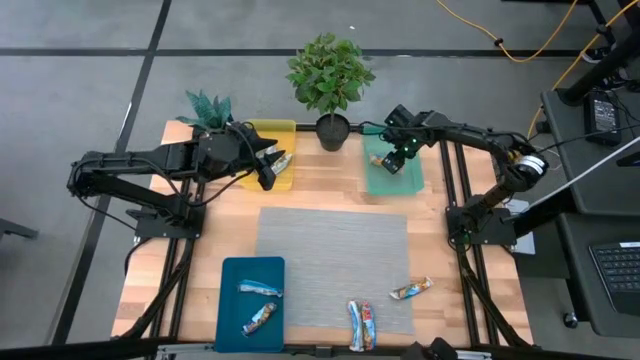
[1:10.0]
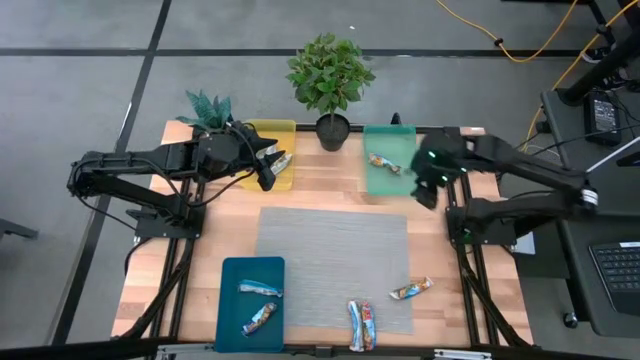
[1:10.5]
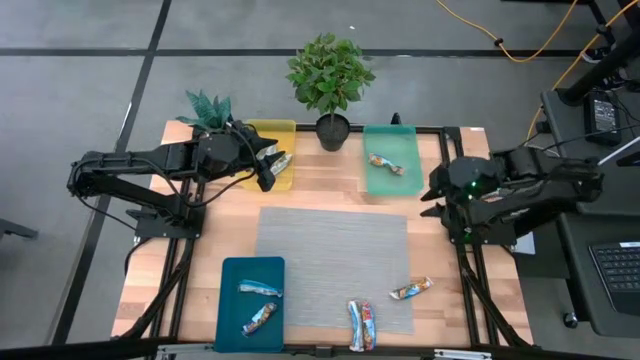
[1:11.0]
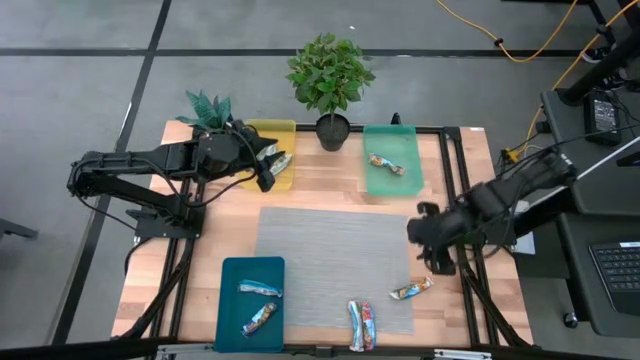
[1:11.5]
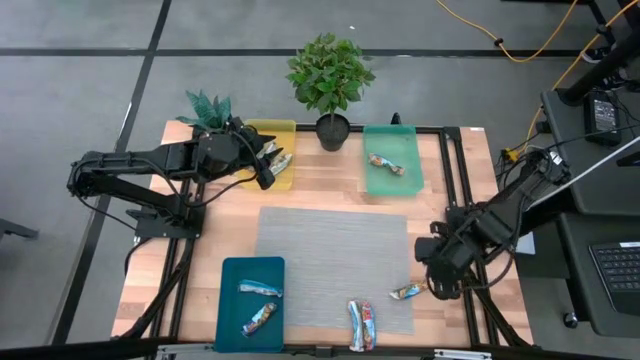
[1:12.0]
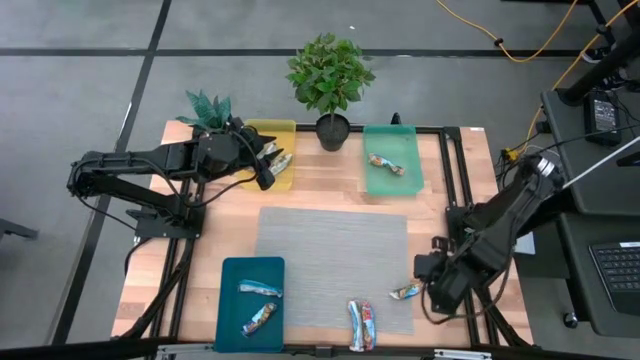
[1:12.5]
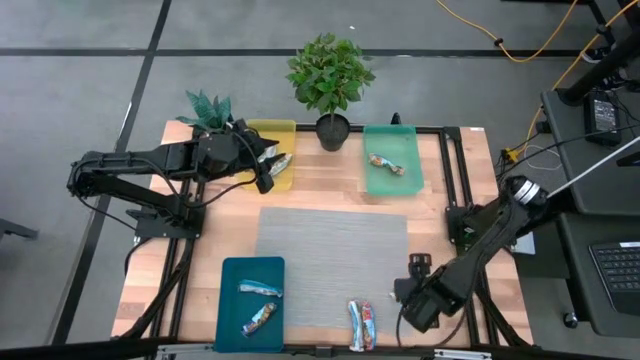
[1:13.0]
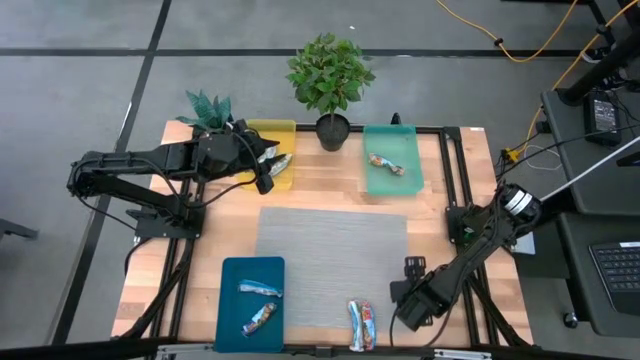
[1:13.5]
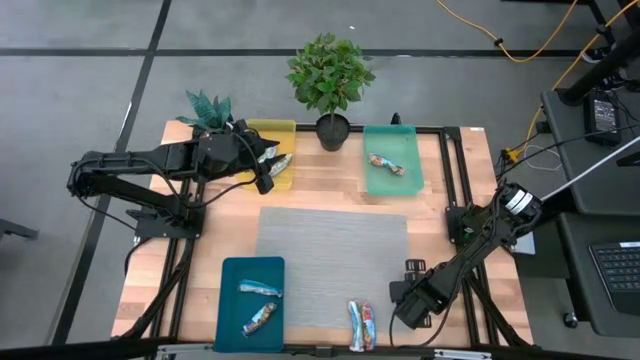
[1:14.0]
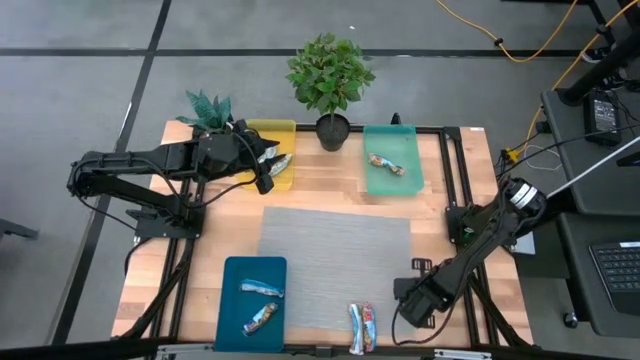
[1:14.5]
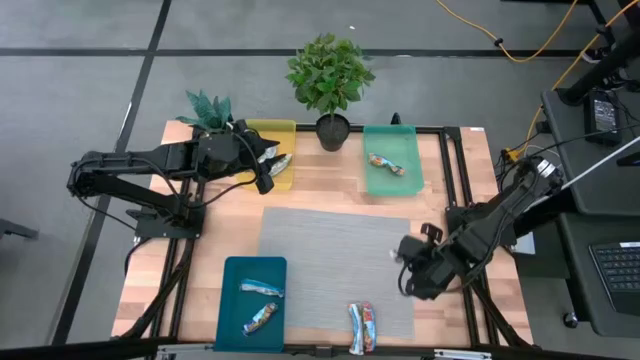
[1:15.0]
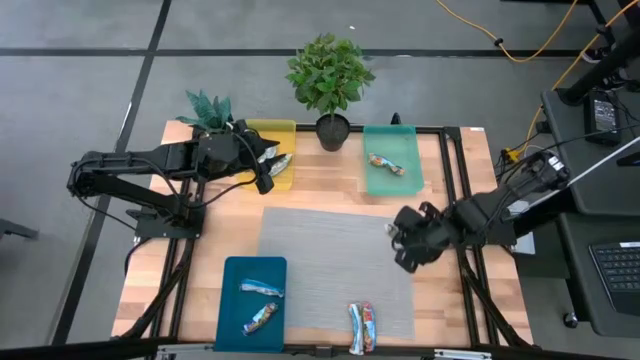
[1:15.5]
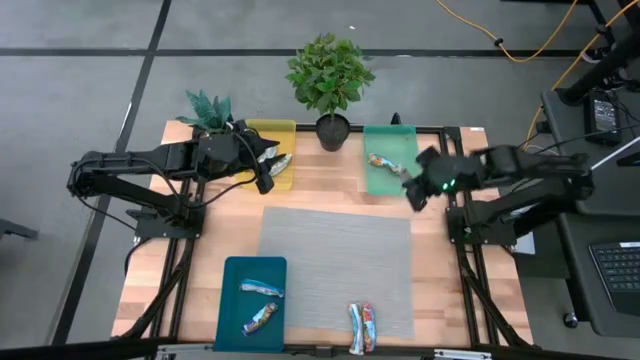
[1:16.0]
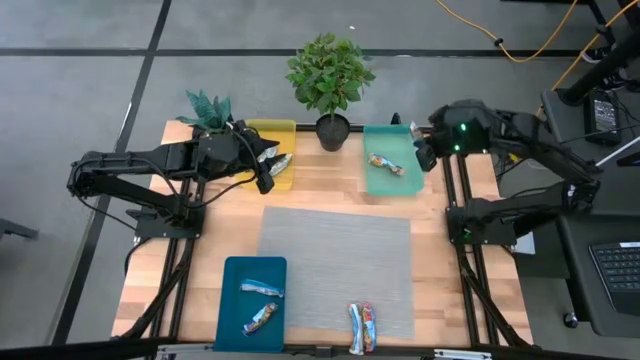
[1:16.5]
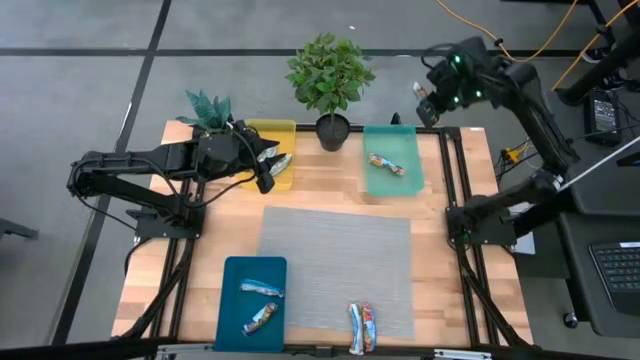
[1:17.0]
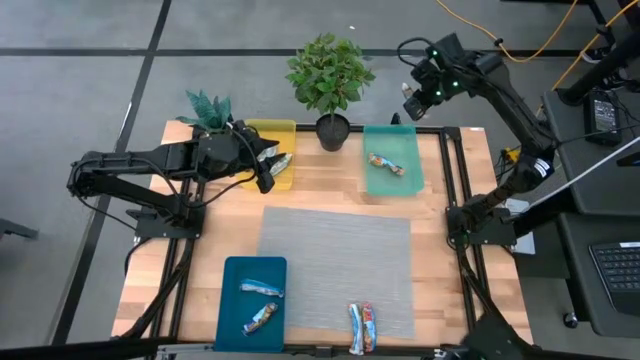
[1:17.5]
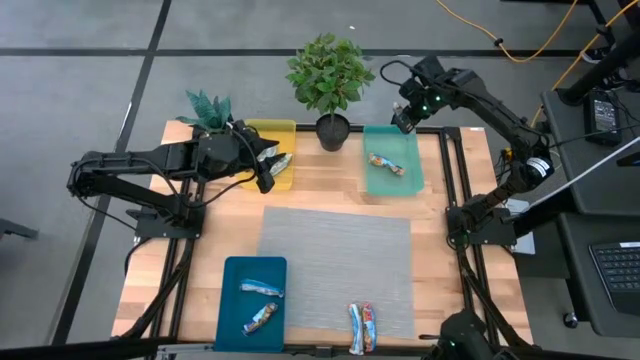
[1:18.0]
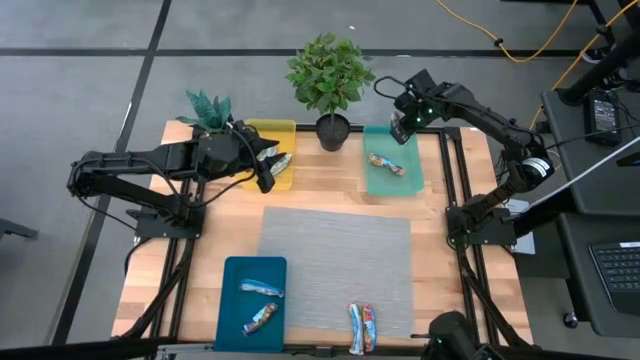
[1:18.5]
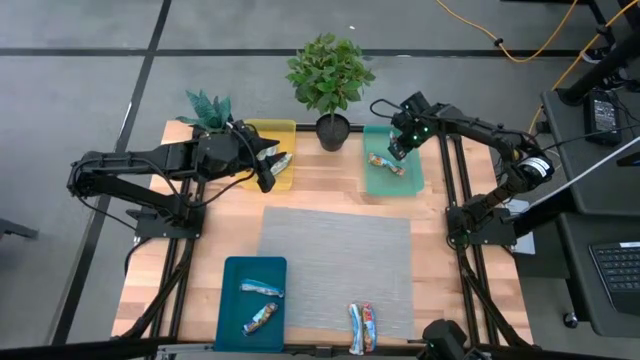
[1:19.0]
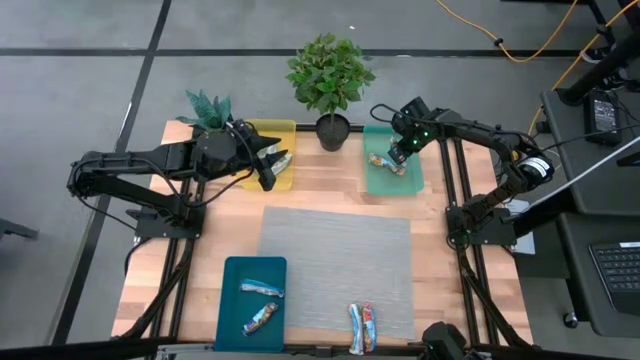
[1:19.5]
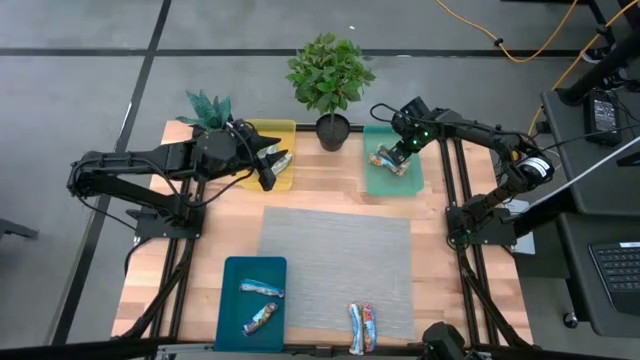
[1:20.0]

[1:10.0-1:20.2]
Task: Pick and place Granola Bars by type
Put the yellow granola bar into the blue transparent bin

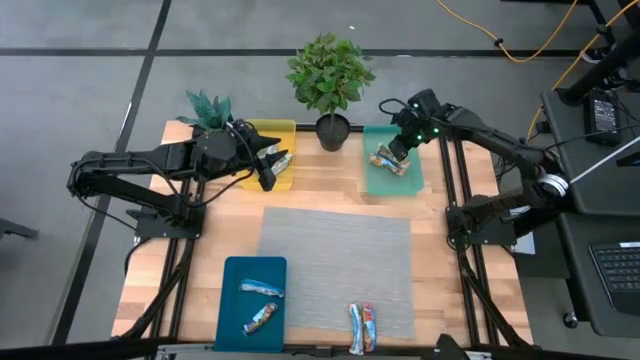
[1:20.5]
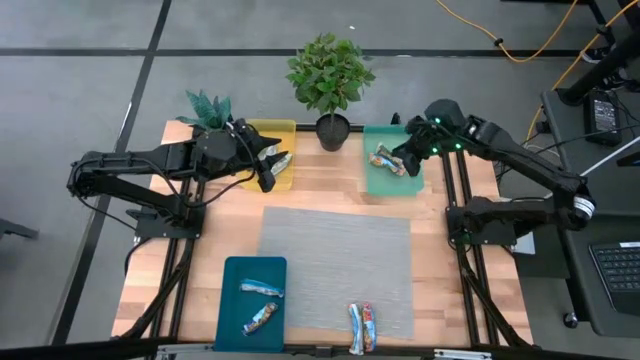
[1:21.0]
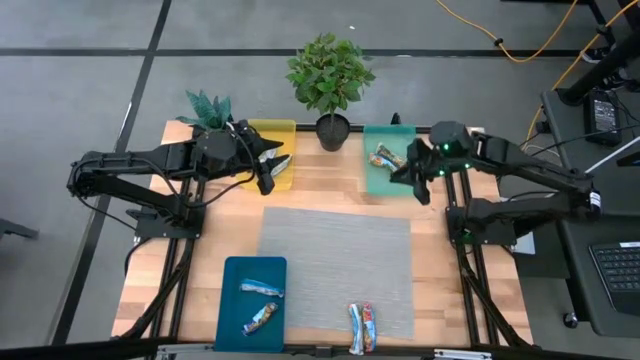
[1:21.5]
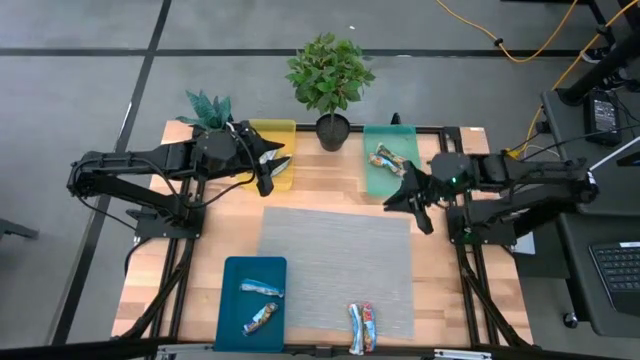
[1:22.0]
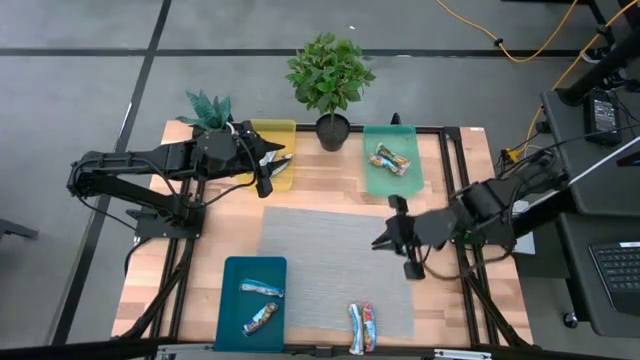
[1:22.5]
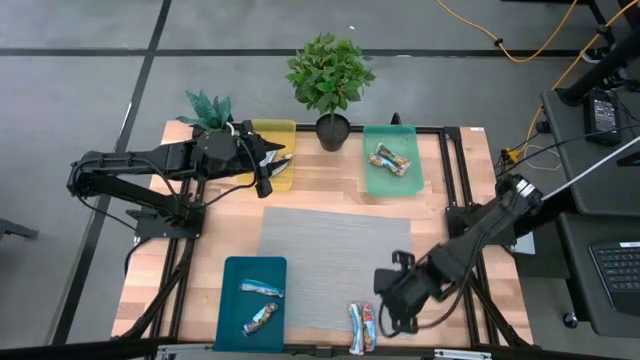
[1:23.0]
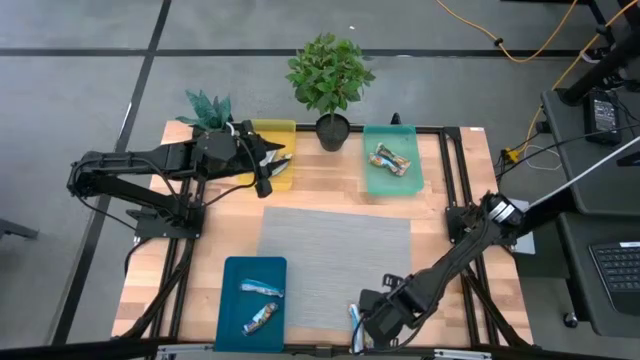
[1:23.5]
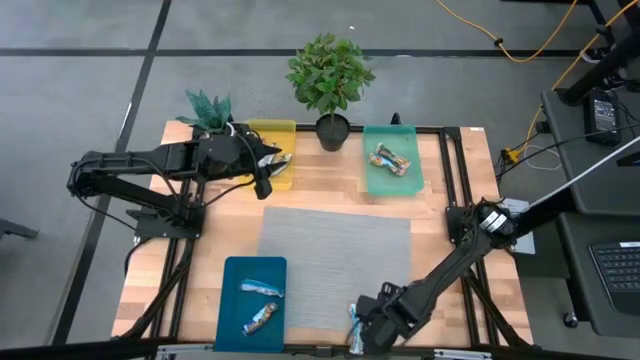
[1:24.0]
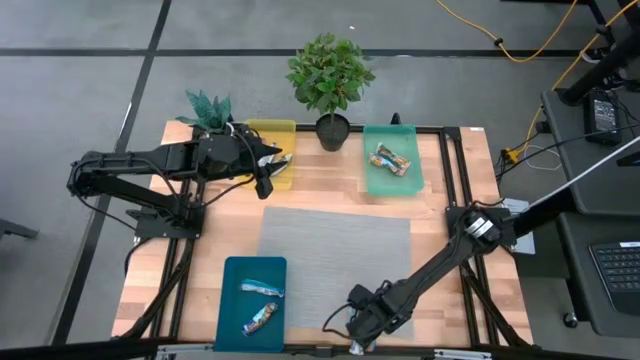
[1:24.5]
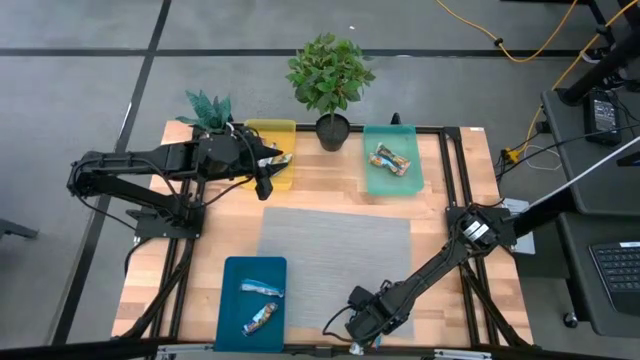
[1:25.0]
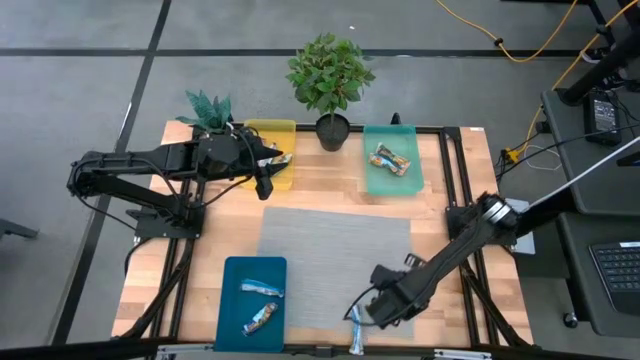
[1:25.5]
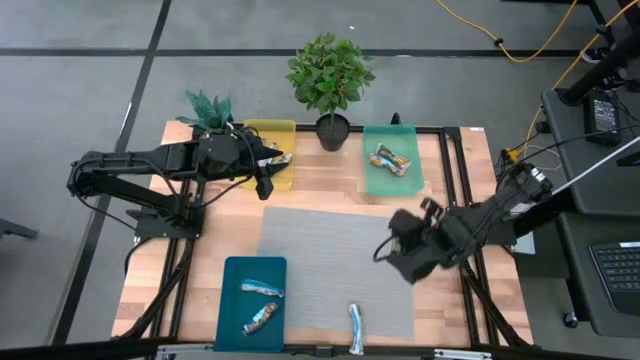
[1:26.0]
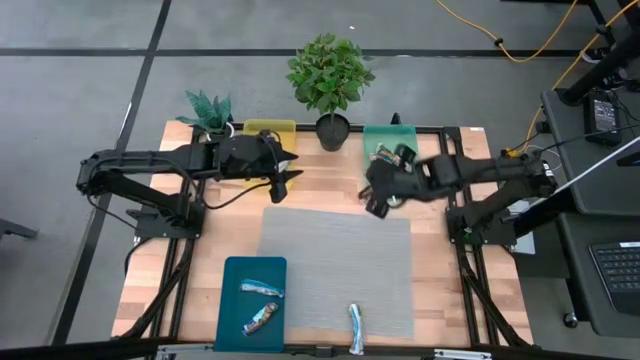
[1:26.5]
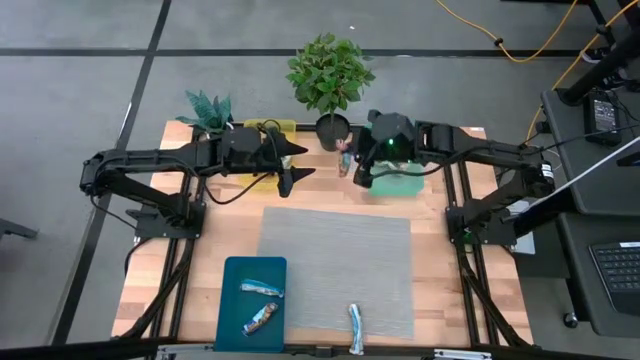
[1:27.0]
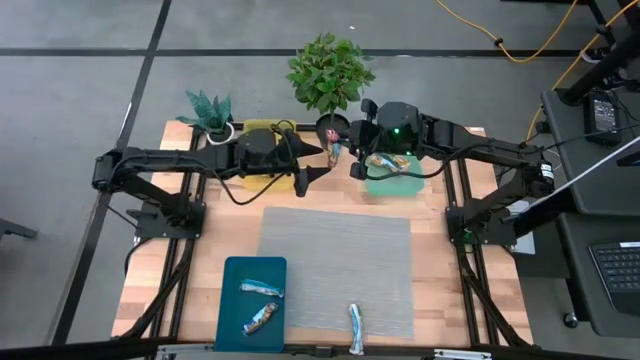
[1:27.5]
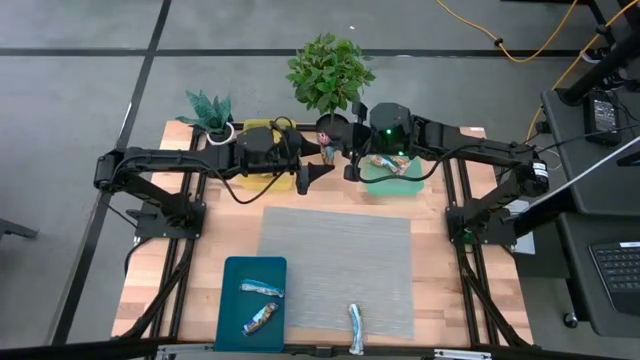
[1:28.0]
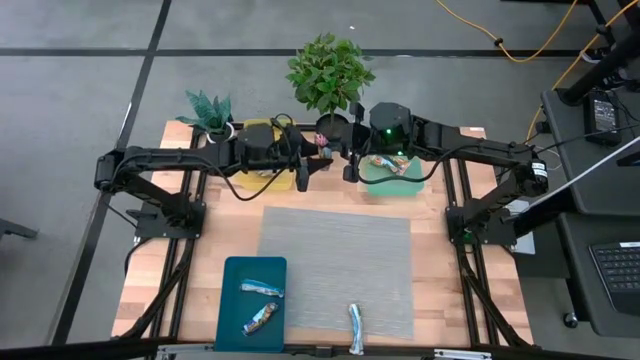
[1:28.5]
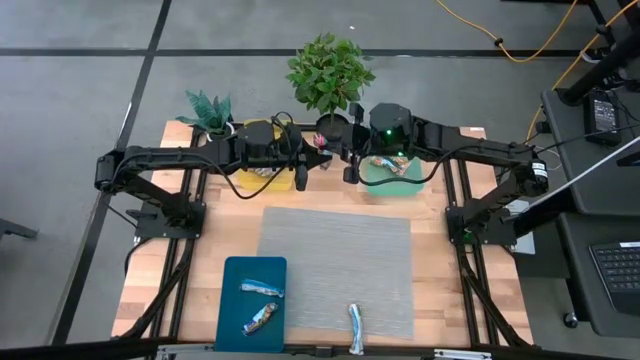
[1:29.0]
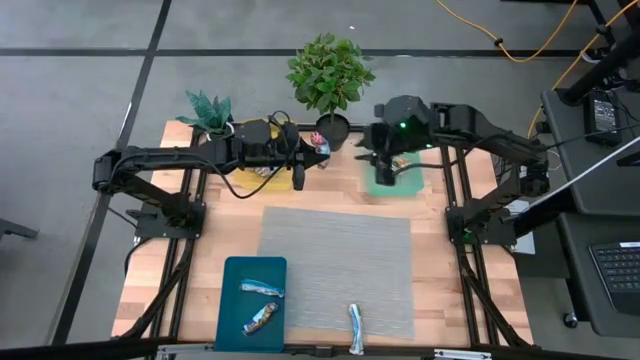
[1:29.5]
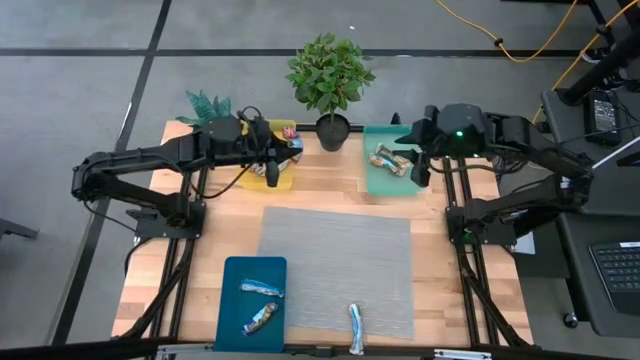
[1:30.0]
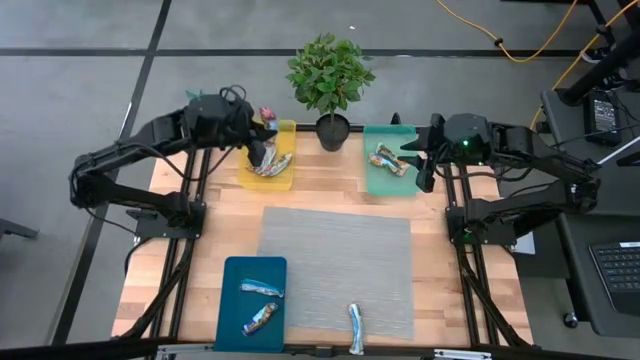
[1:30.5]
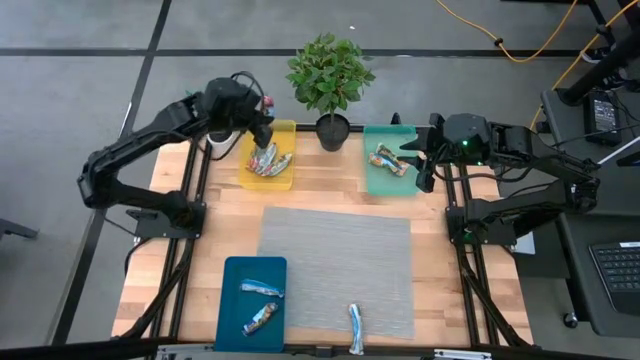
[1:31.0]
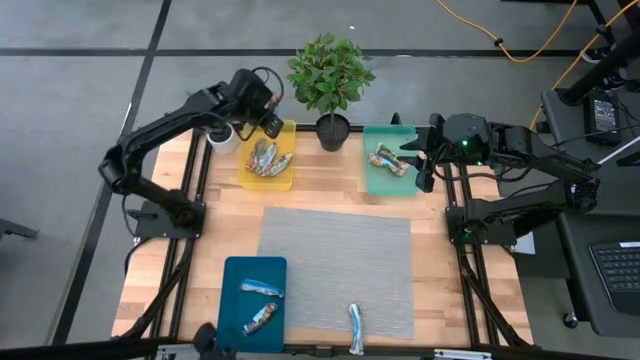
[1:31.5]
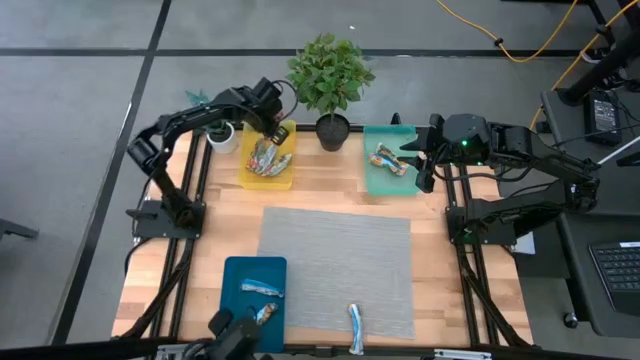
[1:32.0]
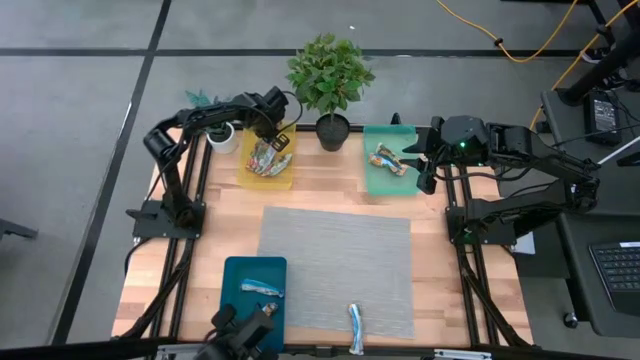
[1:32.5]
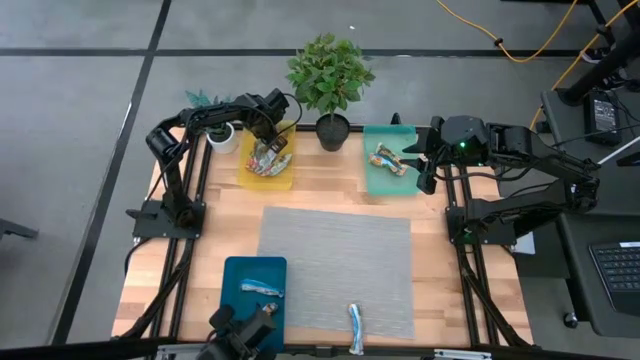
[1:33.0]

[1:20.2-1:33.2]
Put the red granola bar into the yellow transparent bin
